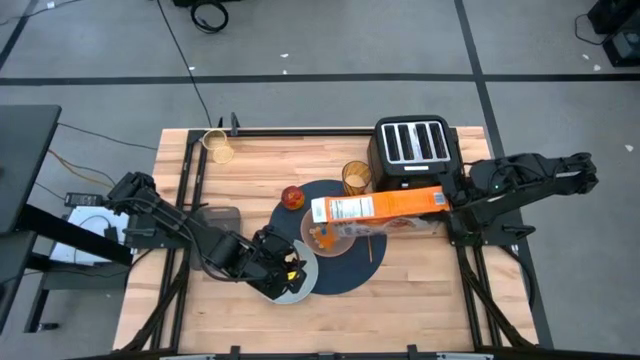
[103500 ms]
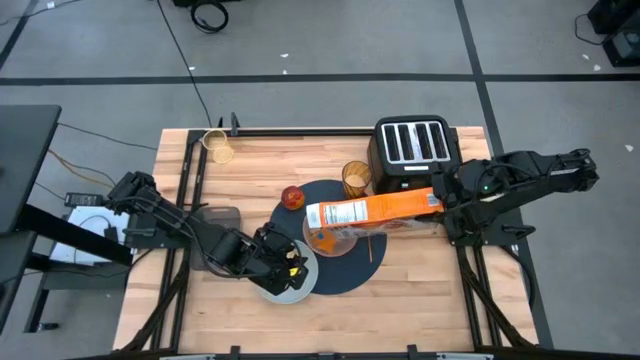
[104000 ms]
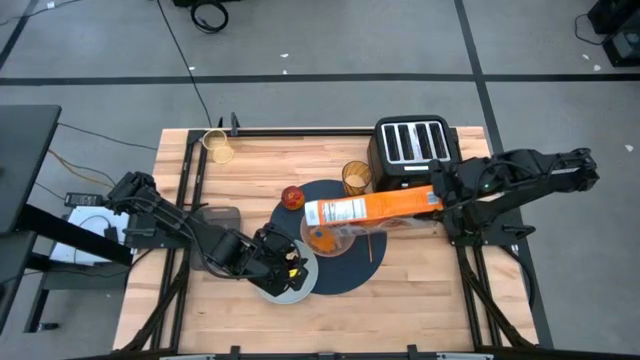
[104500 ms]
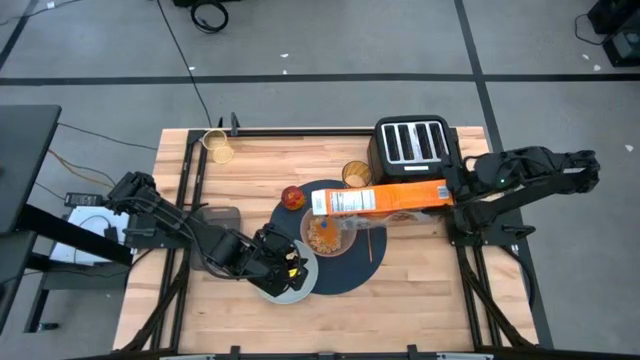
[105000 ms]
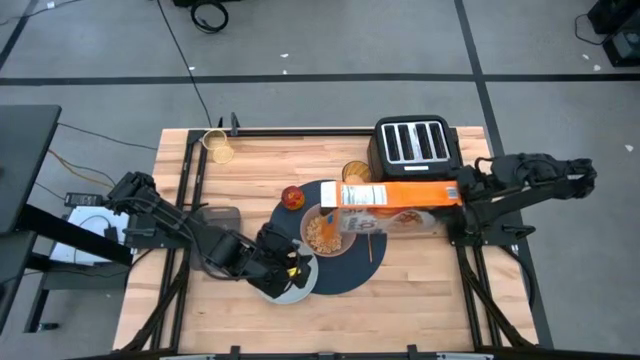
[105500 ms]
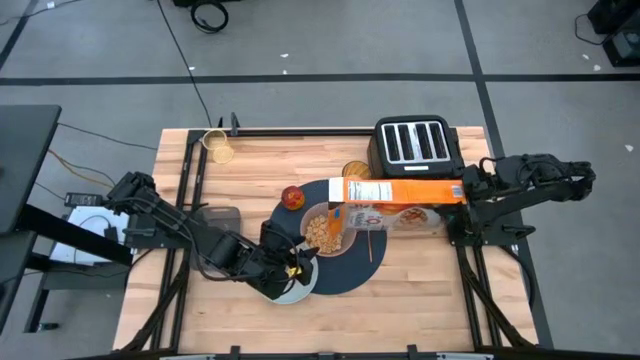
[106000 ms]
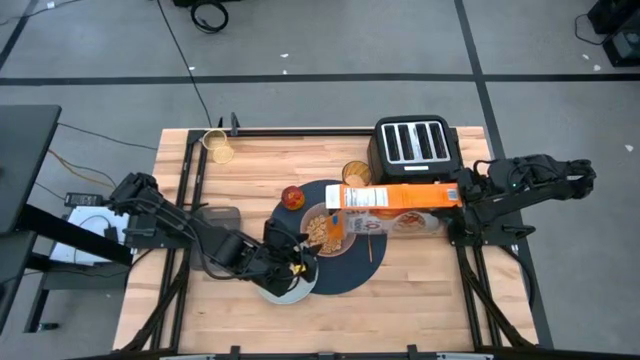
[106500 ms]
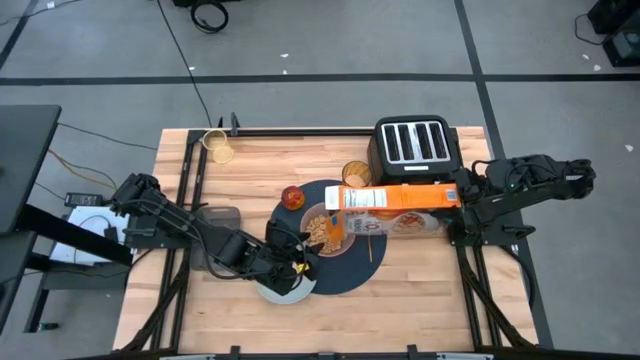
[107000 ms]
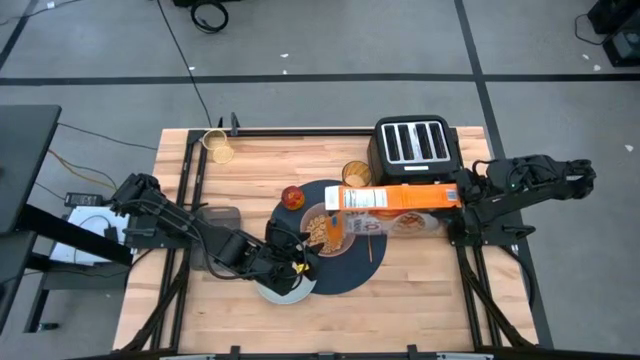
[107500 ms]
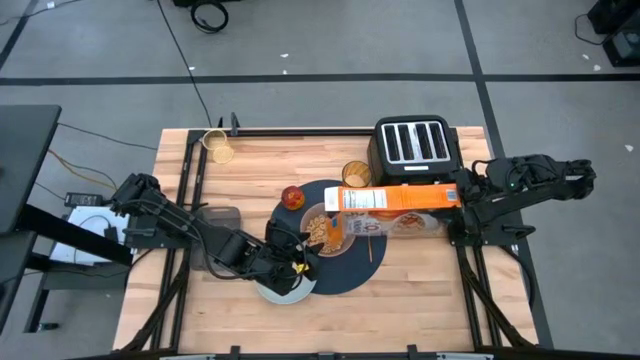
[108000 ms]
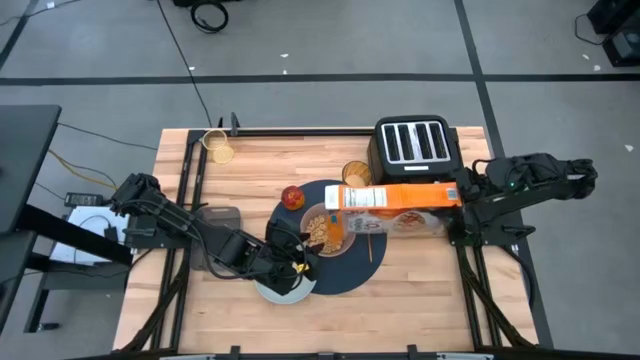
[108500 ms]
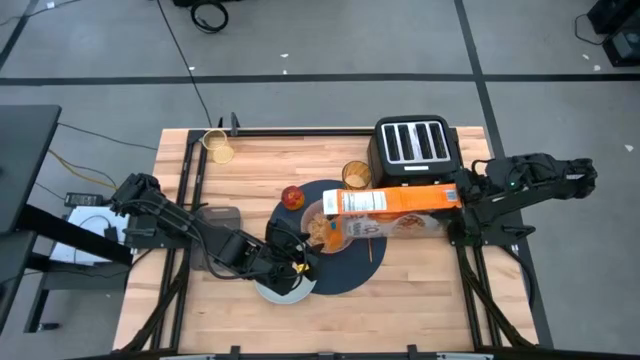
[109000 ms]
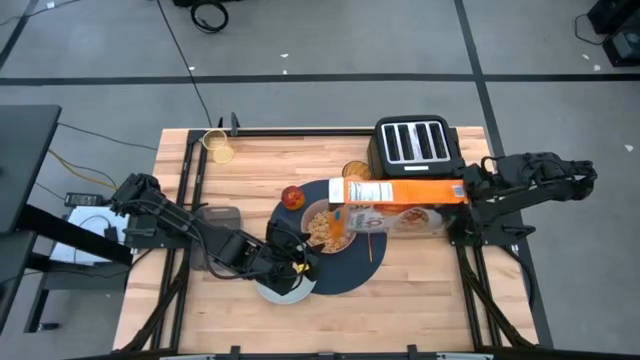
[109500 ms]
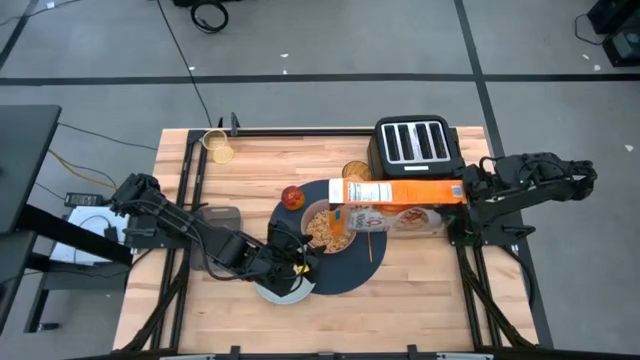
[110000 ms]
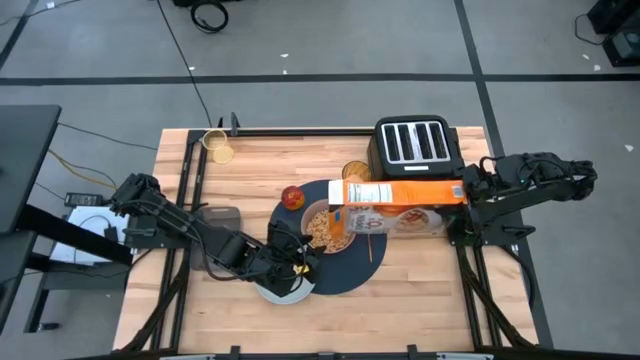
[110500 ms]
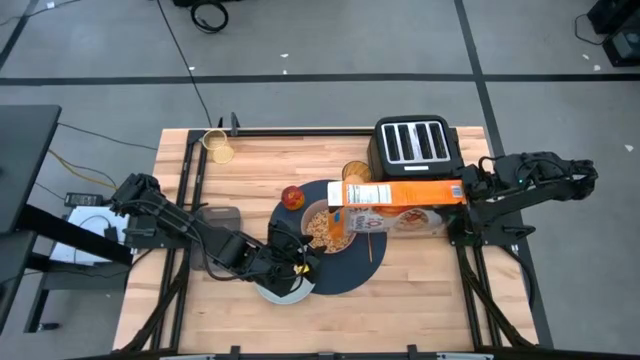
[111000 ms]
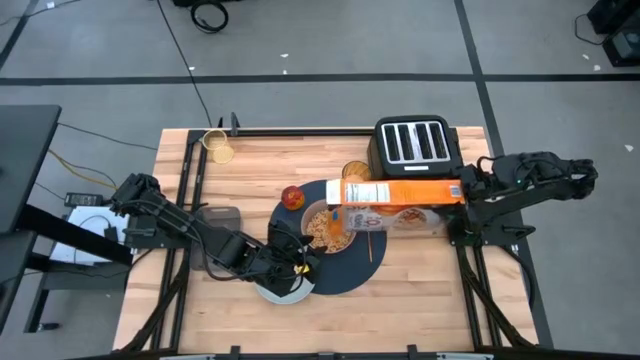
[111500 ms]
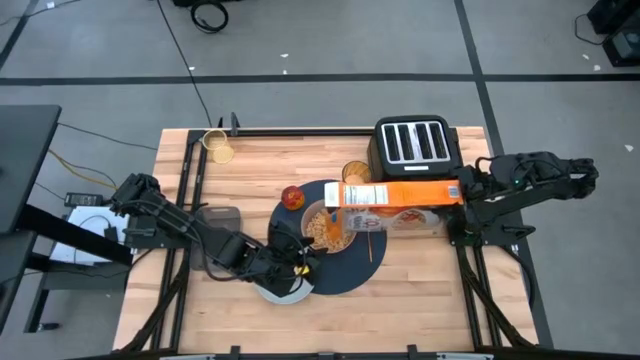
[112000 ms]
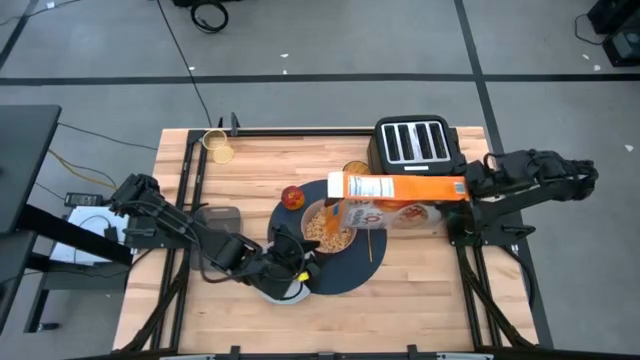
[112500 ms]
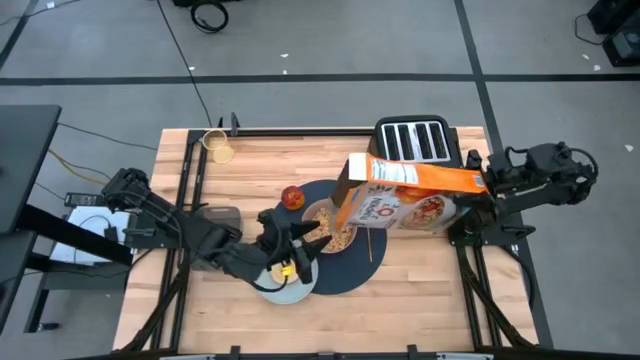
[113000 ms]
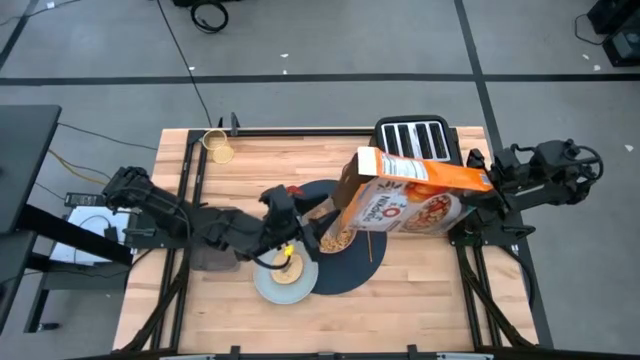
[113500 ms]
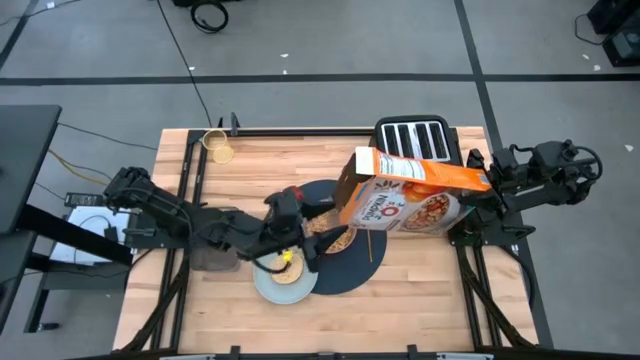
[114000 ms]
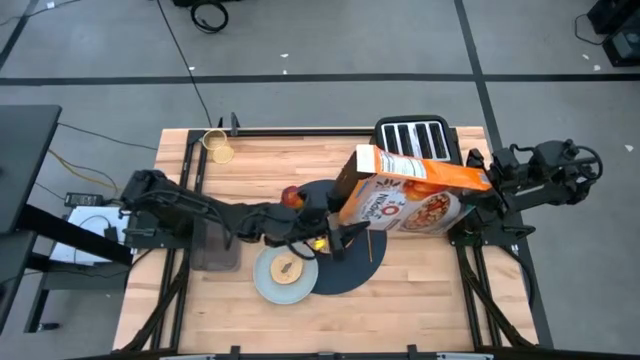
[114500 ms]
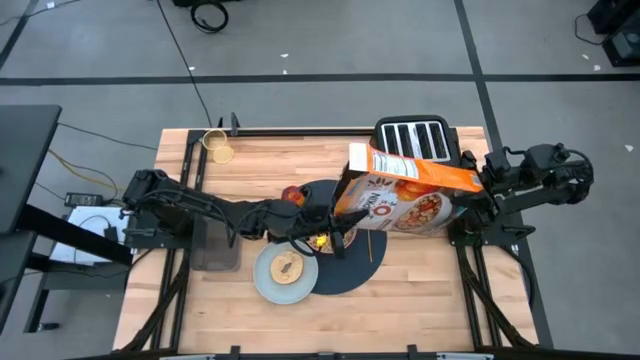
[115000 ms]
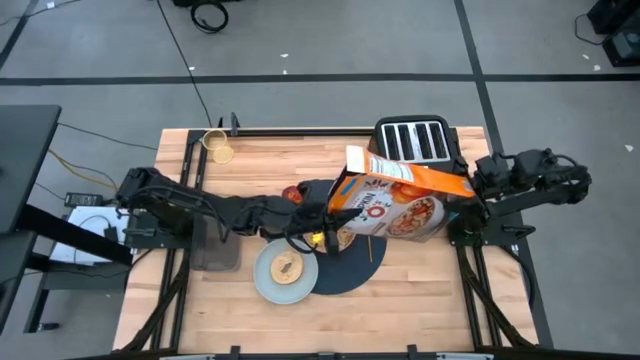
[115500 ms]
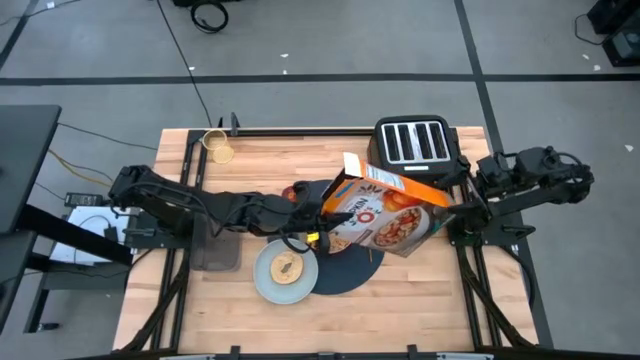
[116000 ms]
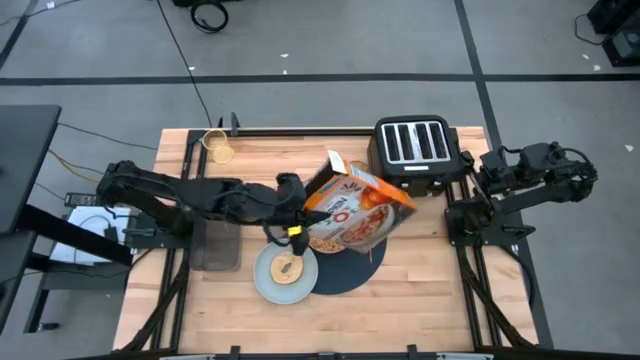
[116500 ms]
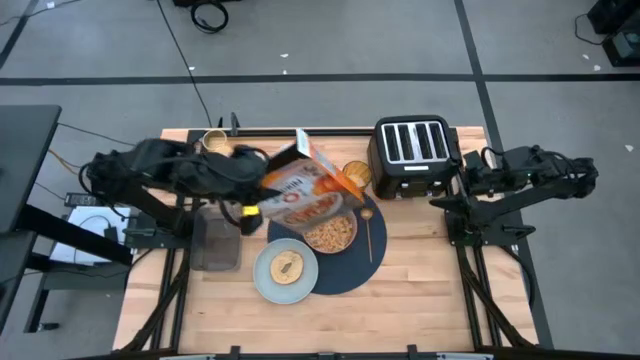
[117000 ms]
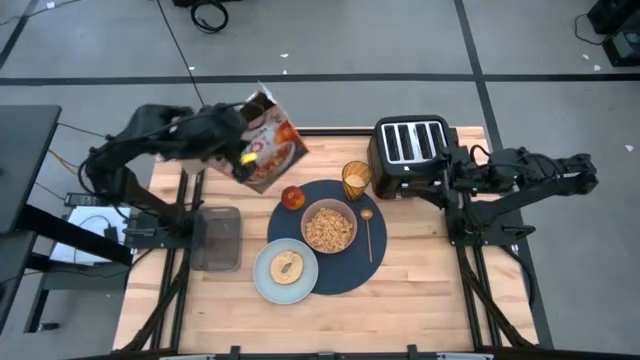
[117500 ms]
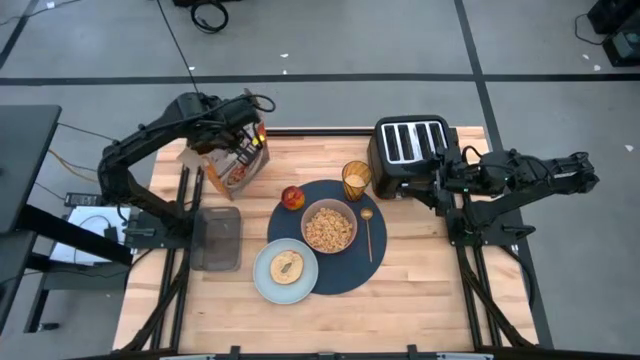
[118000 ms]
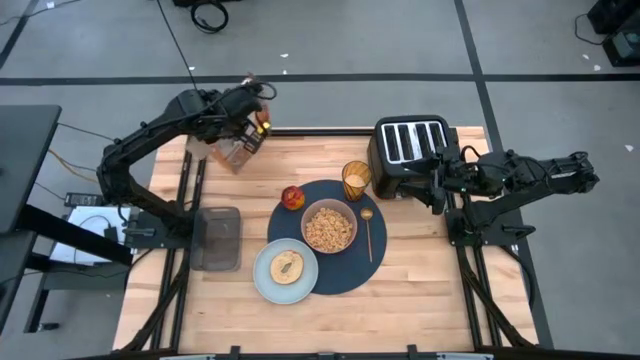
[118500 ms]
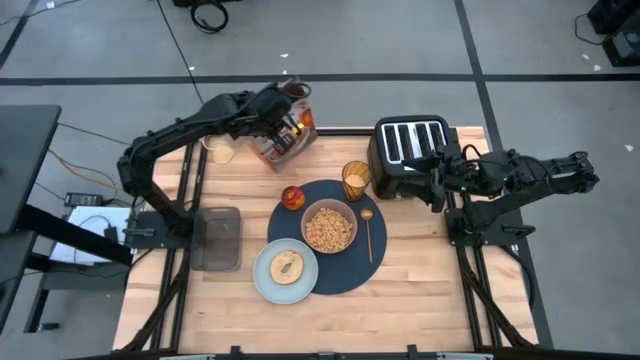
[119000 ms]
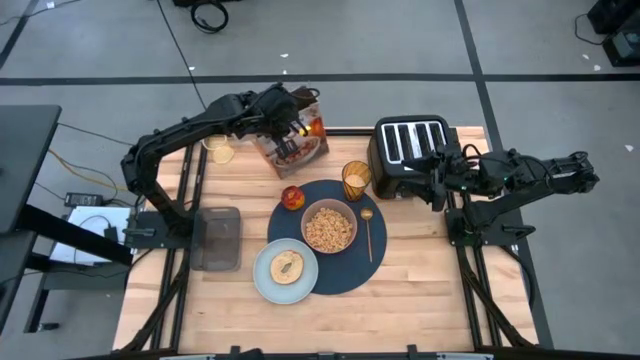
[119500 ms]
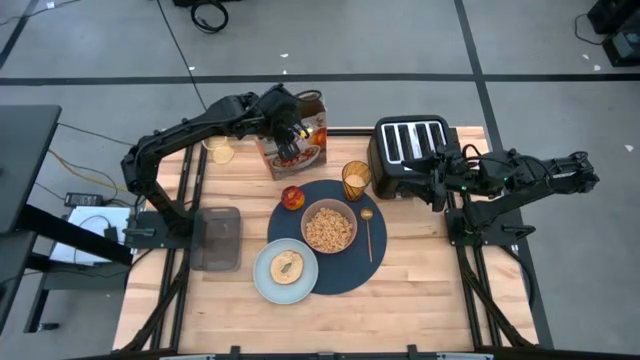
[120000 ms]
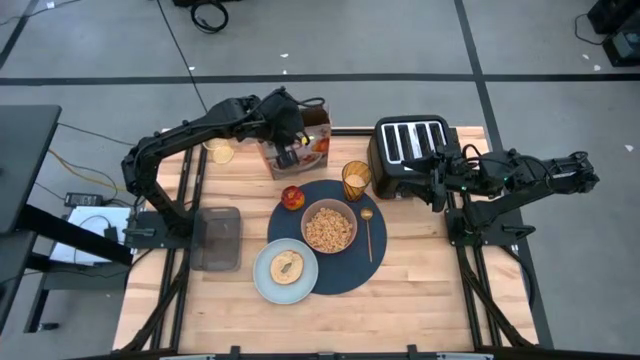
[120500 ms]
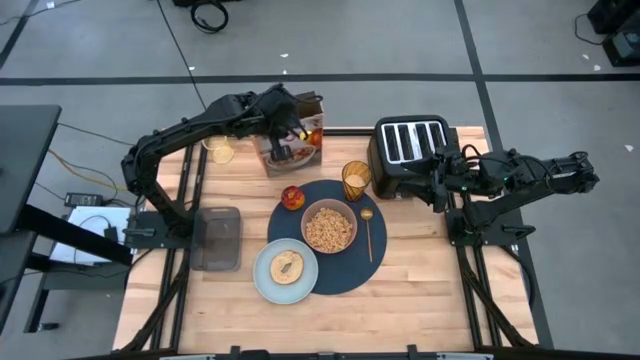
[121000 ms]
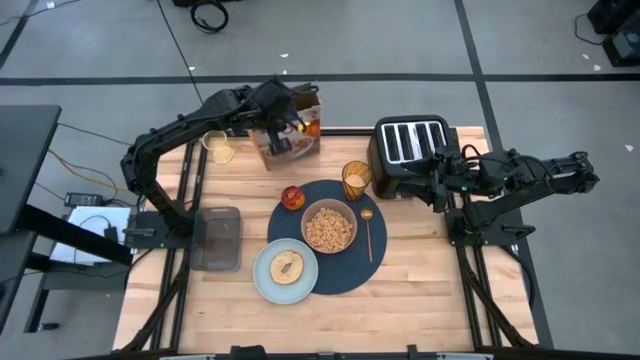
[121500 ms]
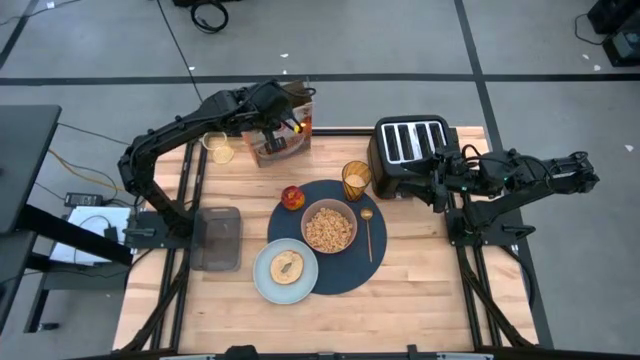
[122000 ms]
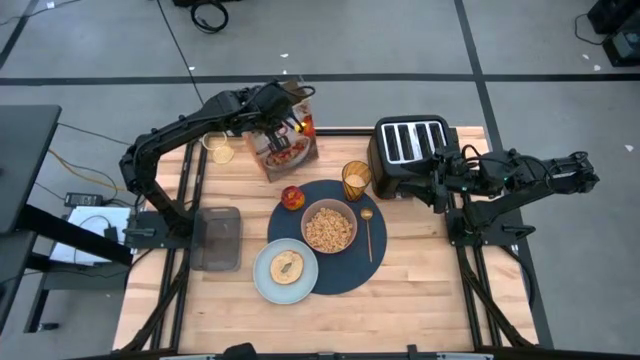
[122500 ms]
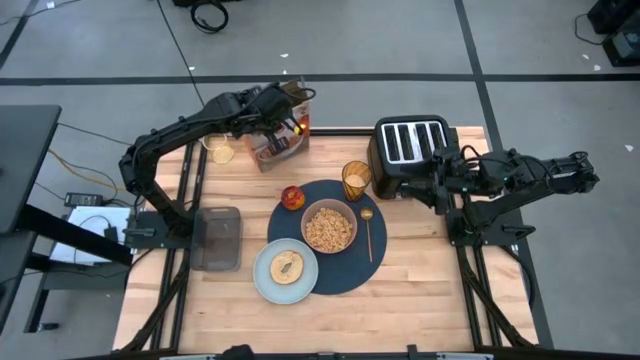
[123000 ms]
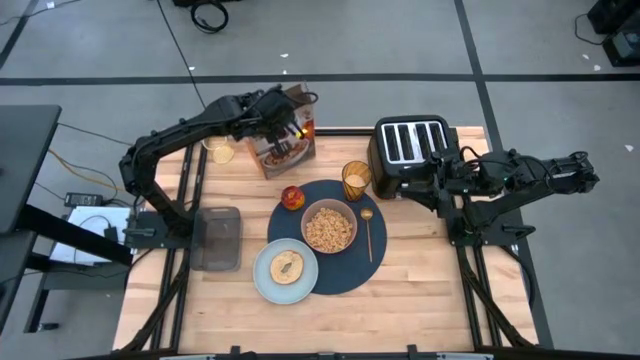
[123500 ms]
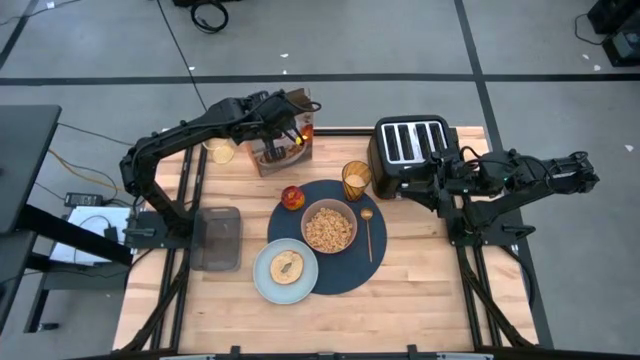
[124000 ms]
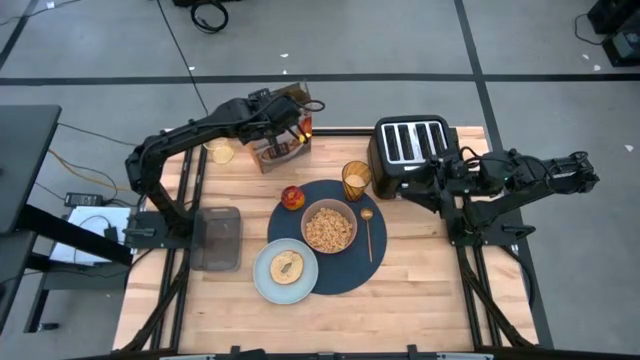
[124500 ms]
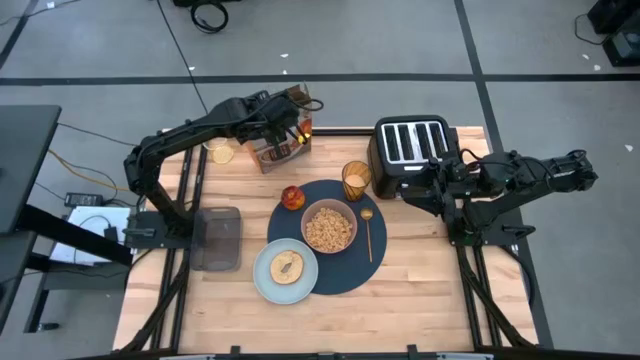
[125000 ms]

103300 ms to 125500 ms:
Task: Arrange a breakfast setting
Pour the cereal from the cereal box into the orange bowl
